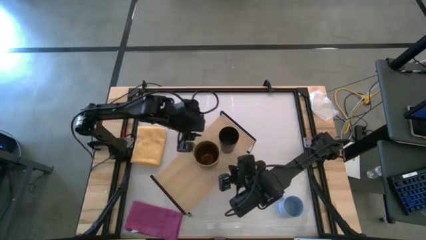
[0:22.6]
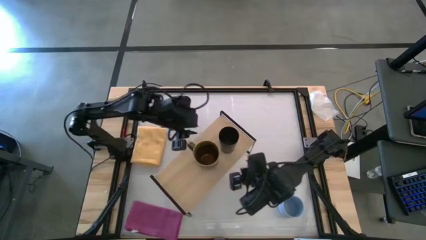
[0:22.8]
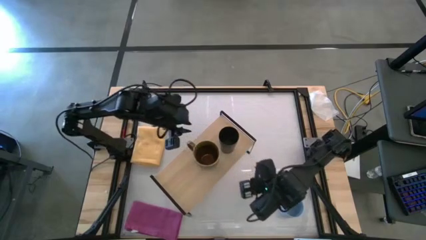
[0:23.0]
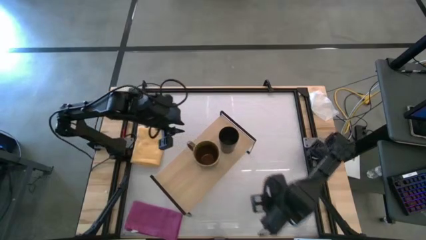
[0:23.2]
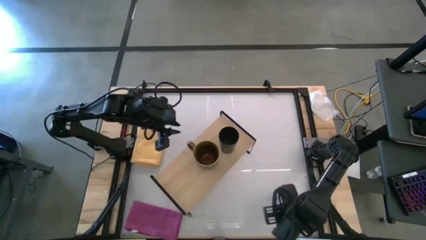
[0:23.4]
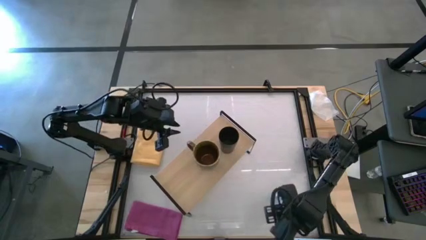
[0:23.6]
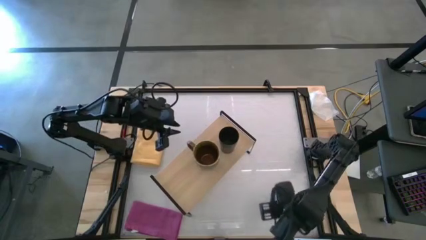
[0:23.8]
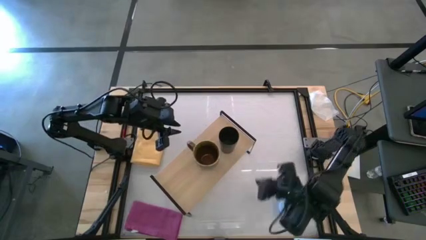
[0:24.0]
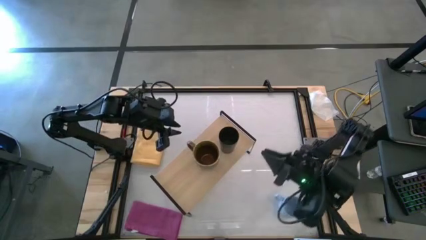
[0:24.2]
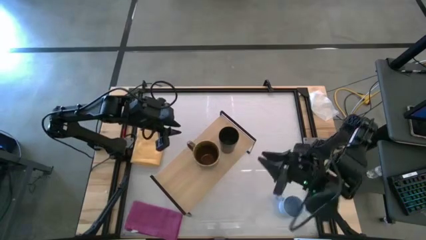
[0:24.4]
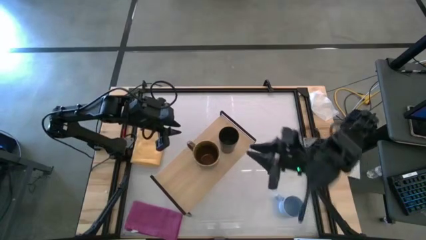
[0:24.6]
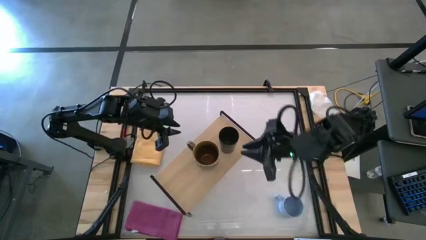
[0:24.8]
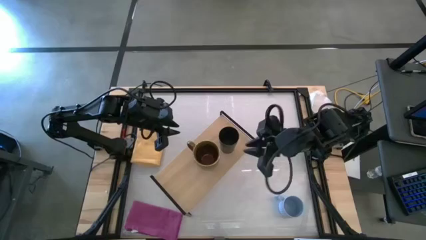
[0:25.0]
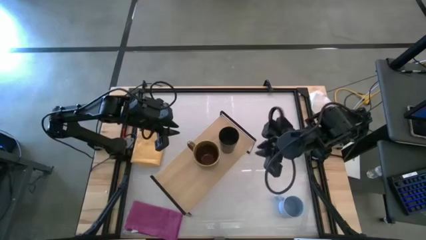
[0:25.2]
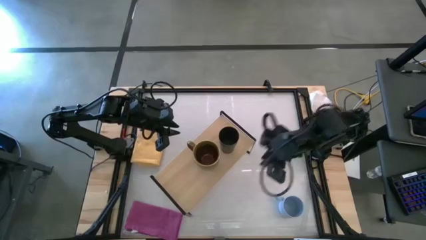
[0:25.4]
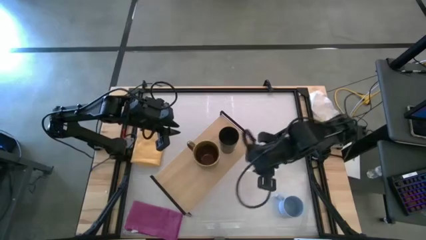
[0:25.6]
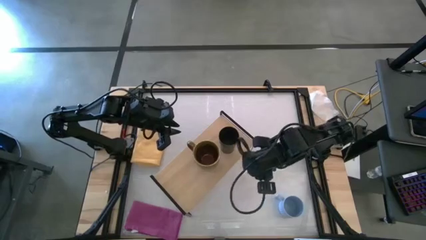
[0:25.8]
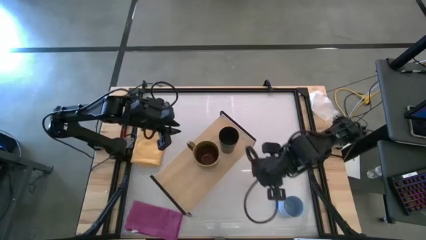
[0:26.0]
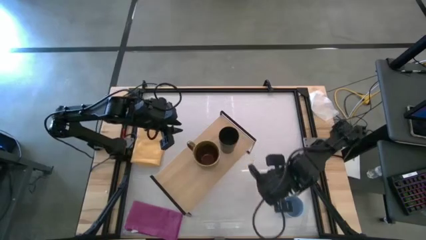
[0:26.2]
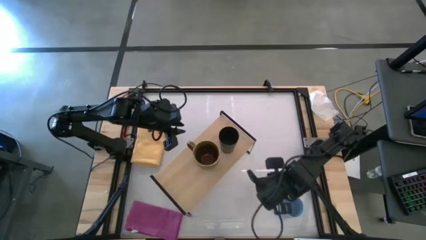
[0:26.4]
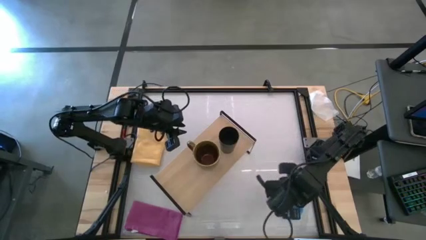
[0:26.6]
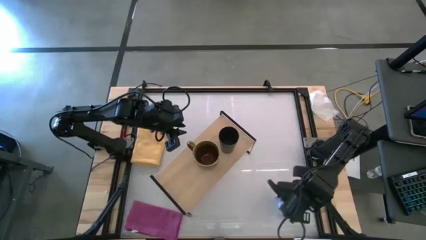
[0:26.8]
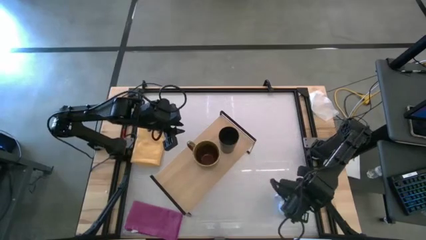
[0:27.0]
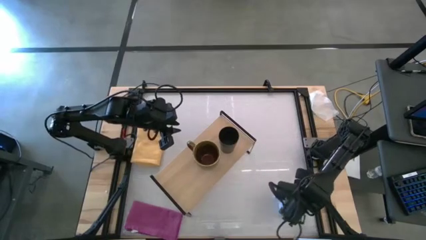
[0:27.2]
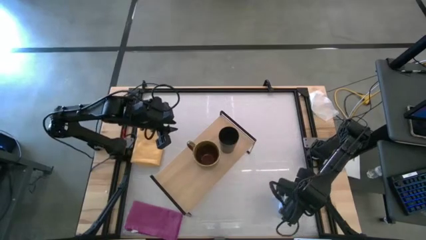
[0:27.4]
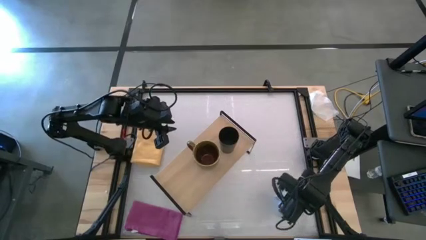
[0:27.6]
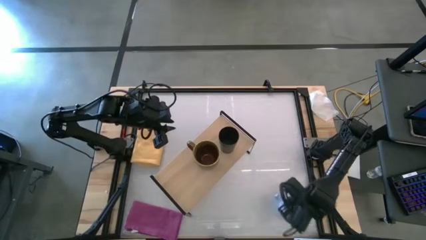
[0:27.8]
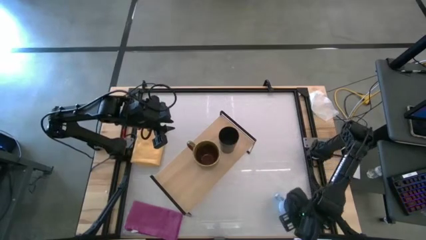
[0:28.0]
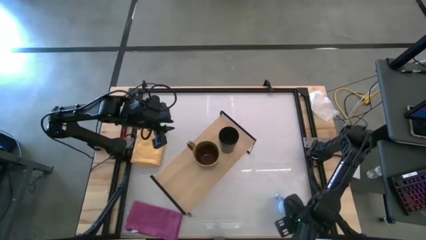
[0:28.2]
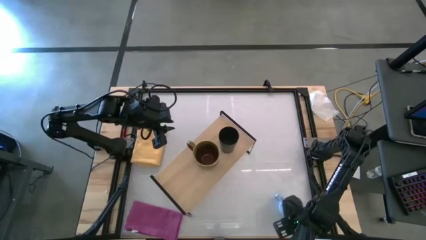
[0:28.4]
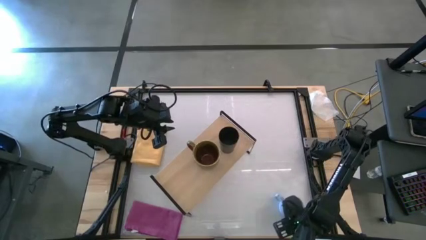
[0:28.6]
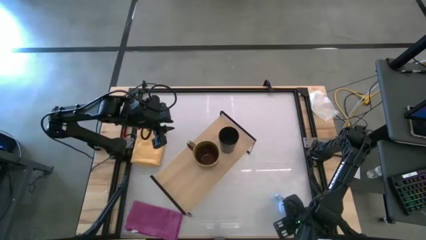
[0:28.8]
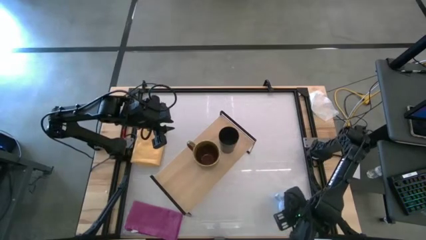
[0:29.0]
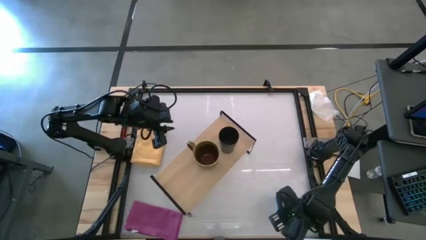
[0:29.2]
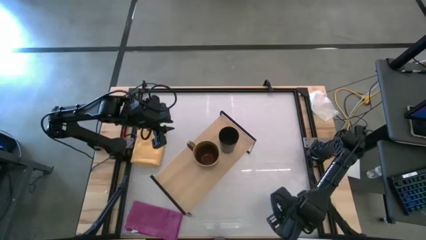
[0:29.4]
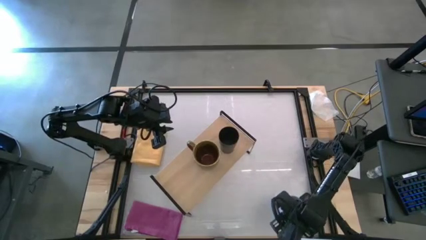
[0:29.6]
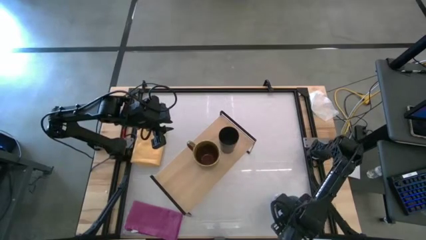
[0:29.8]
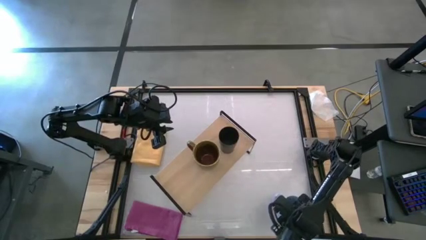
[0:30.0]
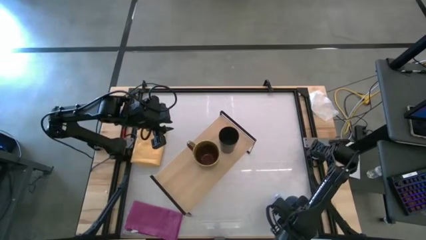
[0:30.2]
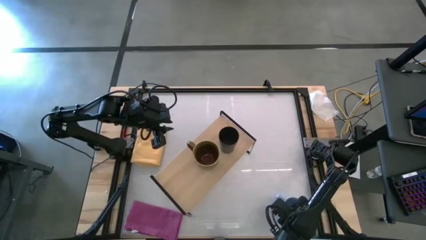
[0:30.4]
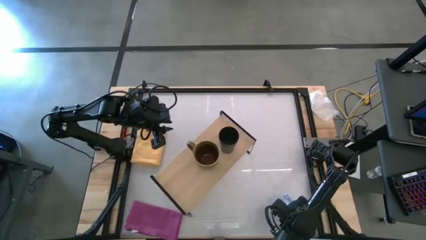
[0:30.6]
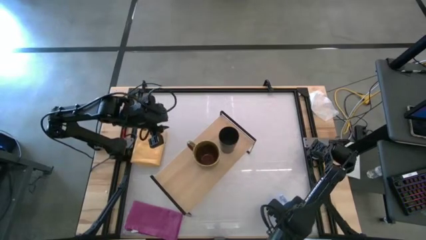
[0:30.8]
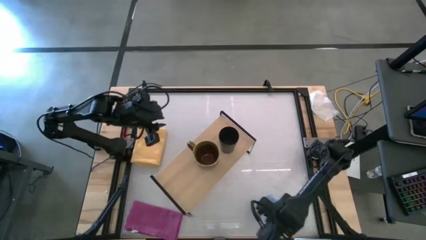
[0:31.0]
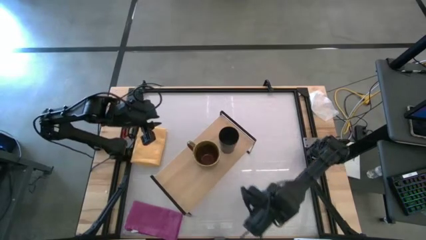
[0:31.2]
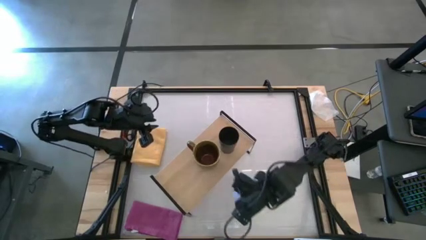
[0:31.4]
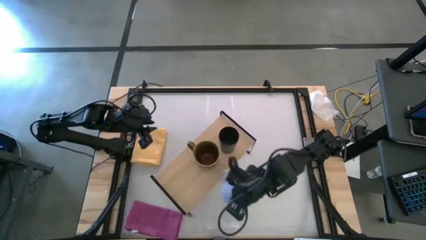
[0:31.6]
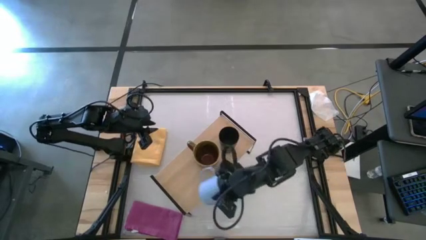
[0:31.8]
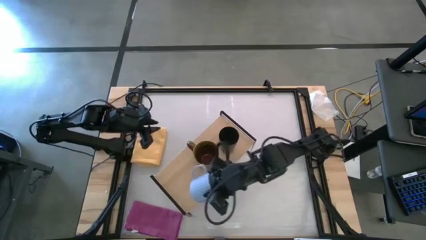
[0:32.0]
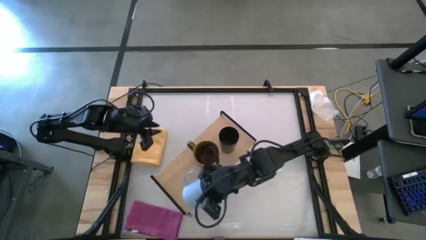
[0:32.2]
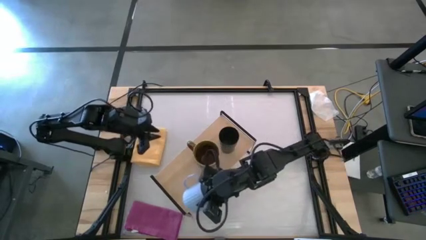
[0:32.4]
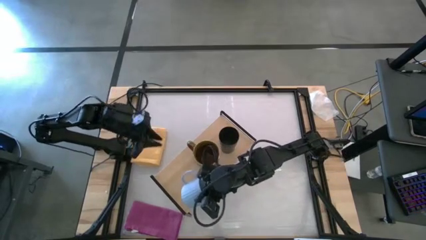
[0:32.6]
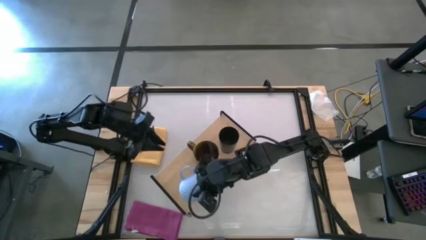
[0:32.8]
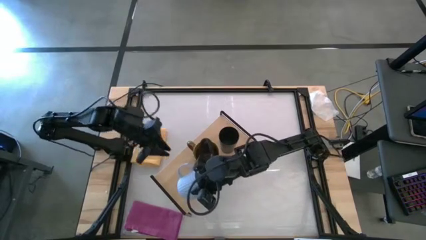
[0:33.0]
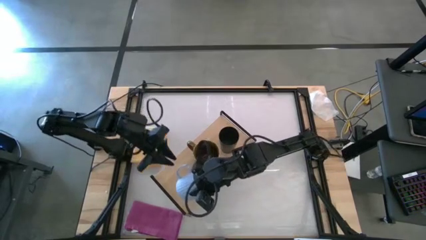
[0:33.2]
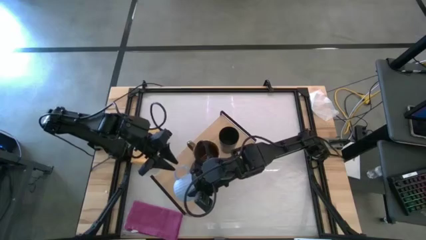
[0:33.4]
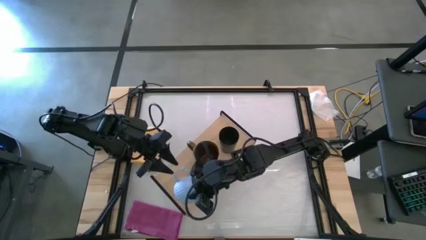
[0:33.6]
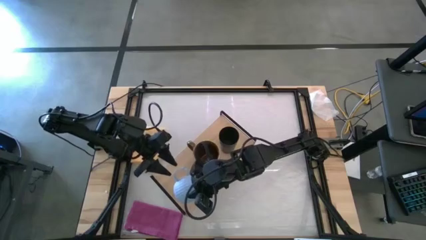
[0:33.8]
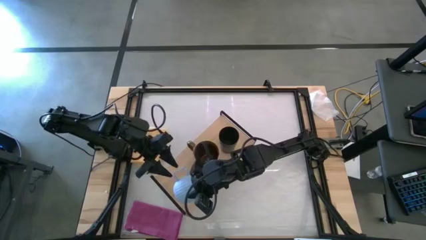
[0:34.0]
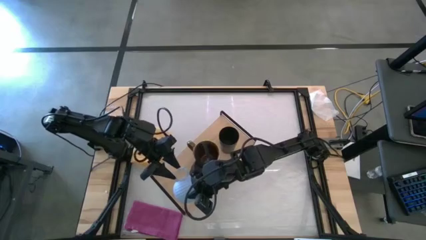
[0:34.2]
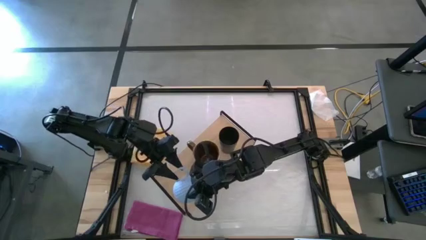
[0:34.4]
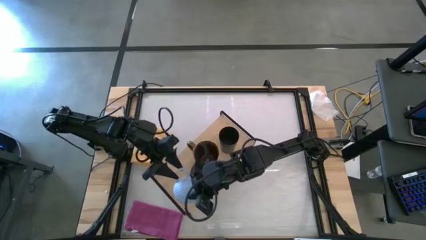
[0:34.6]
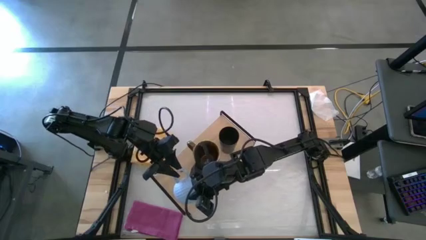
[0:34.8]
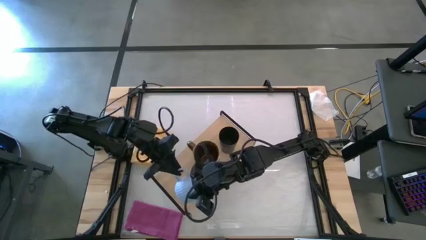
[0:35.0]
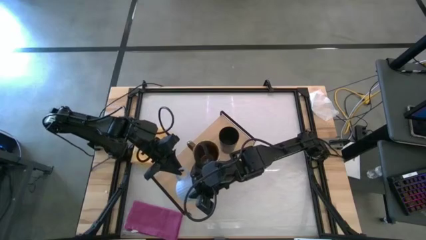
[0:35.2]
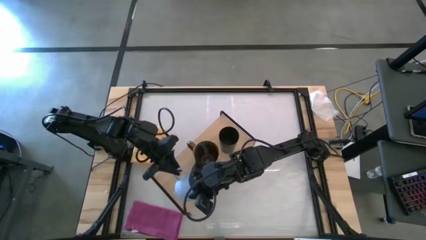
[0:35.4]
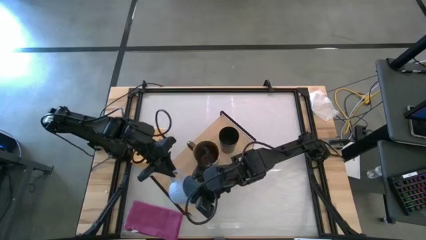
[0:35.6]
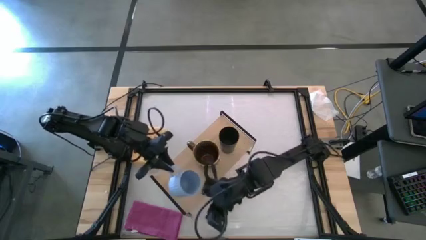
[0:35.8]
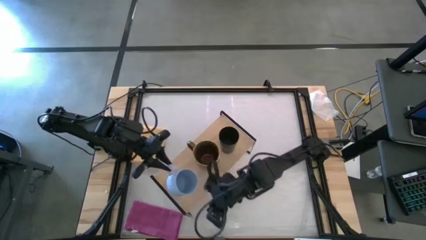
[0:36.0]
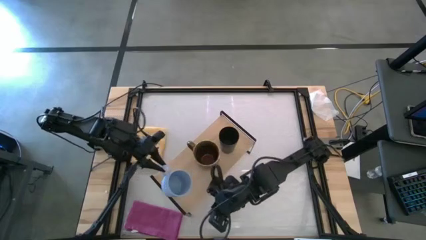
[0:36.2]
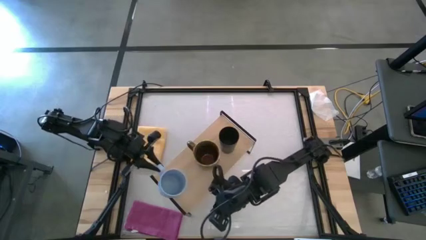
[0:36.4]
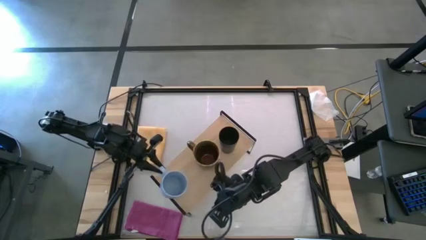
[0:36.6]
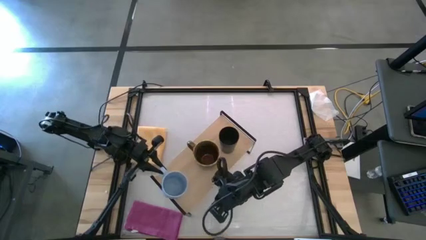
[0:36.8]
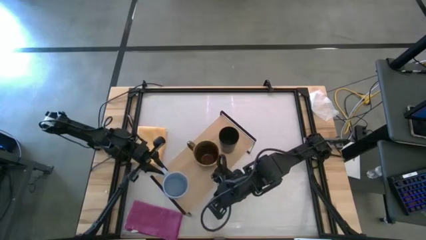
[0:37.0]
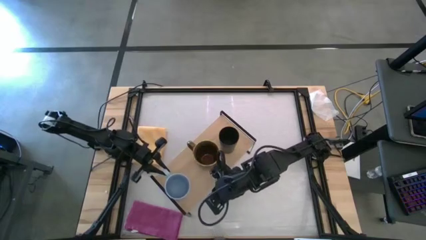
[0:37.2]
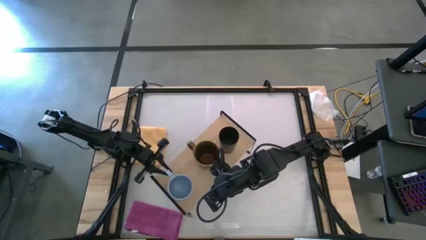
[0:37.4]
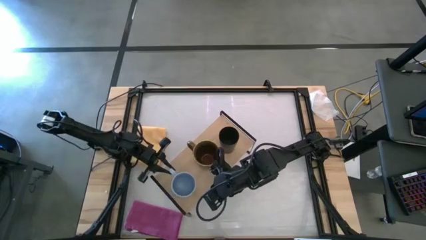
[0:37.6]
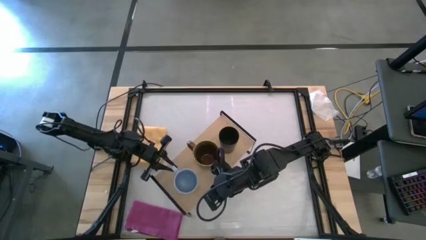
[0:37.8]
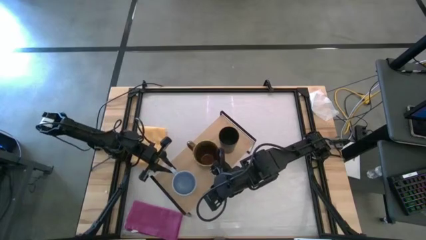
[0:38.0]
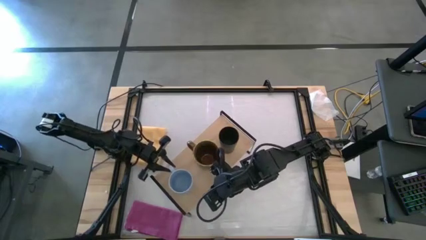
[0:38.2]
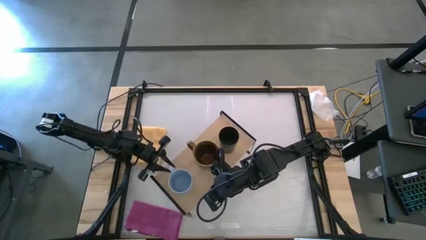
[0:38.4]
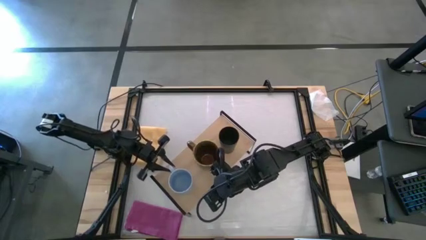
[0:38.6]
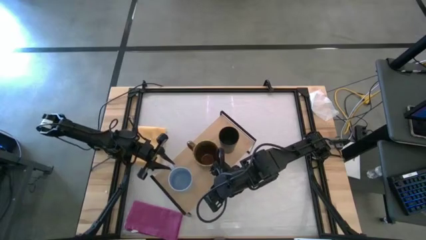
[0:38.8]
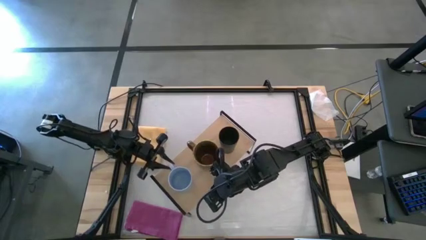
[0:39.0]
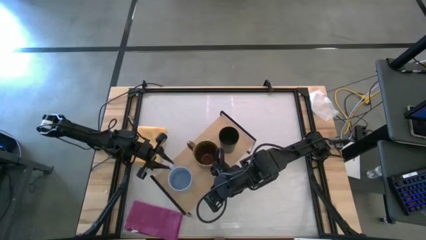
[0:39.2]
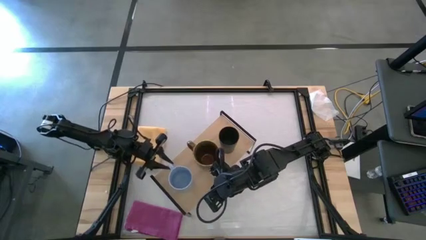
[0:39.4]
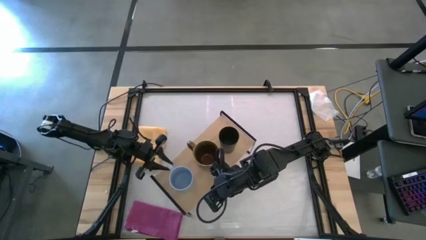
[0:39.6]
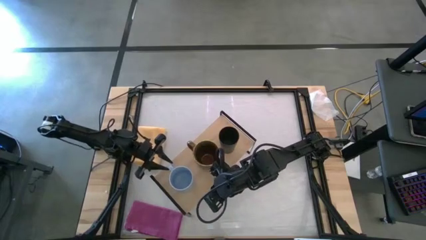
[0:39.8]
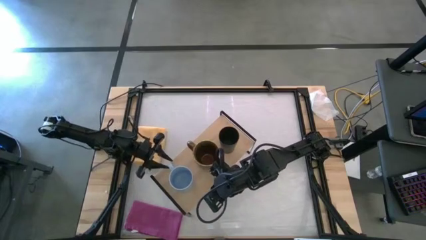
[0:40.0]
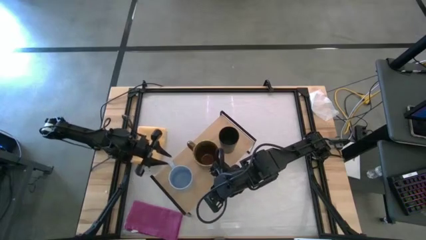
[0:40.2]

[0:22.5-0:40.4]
Task: Stack small to large cups/mugs on shelf
Put the blue mug on the shelf
